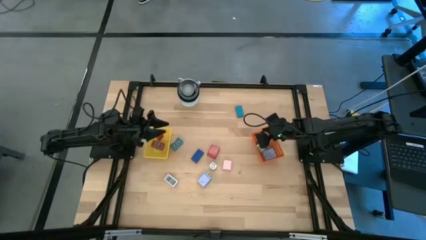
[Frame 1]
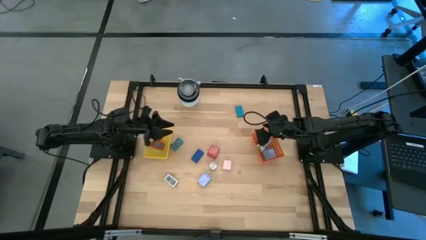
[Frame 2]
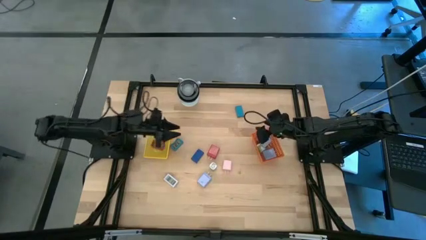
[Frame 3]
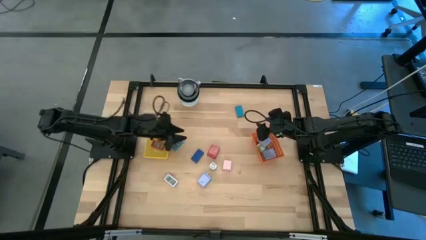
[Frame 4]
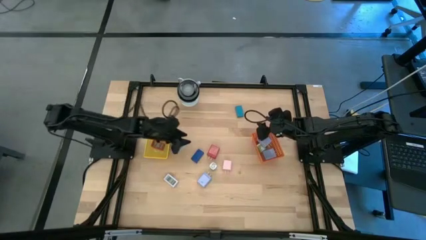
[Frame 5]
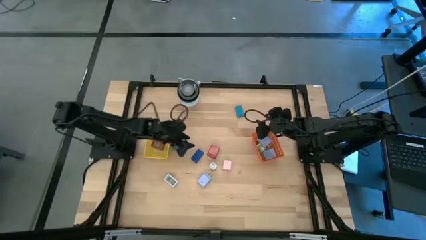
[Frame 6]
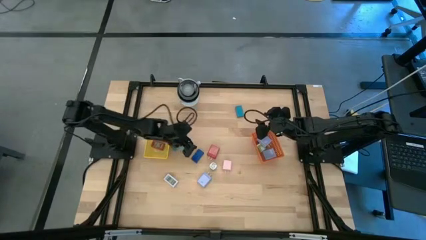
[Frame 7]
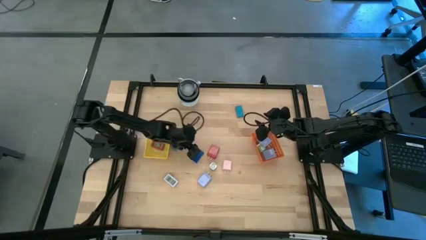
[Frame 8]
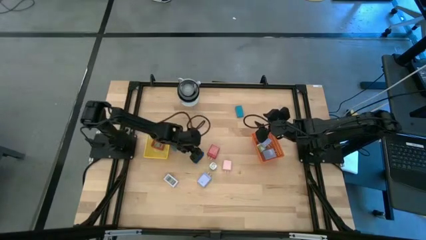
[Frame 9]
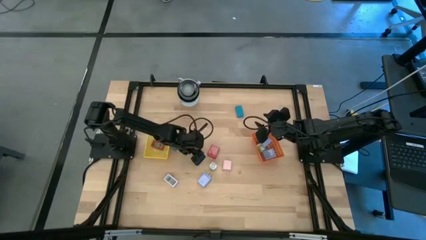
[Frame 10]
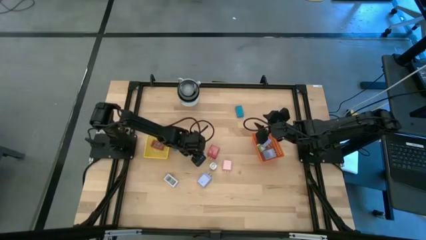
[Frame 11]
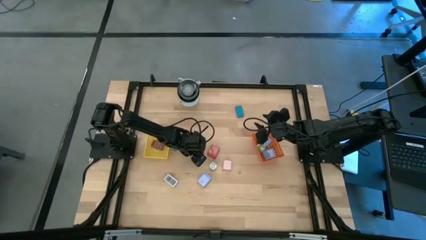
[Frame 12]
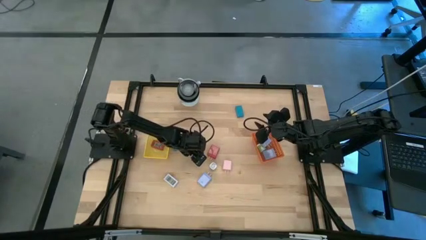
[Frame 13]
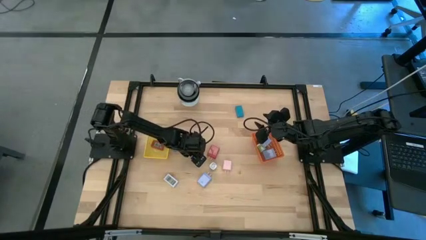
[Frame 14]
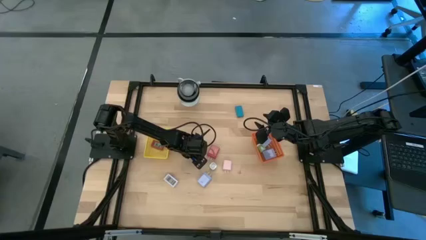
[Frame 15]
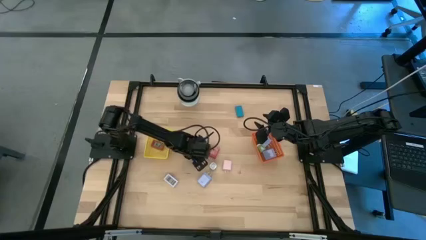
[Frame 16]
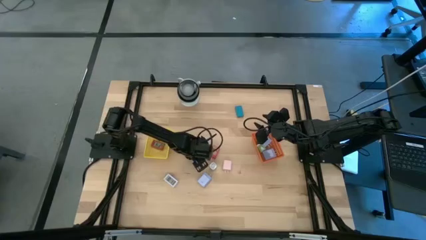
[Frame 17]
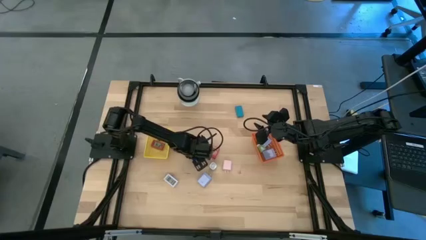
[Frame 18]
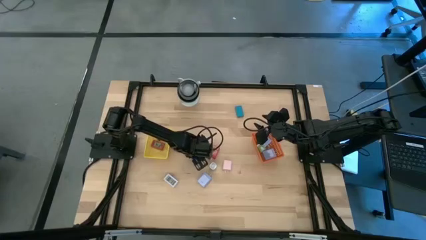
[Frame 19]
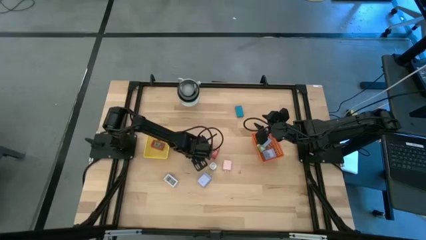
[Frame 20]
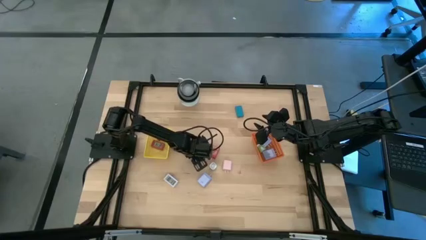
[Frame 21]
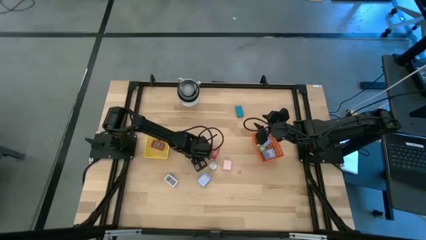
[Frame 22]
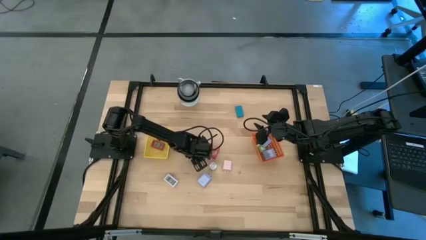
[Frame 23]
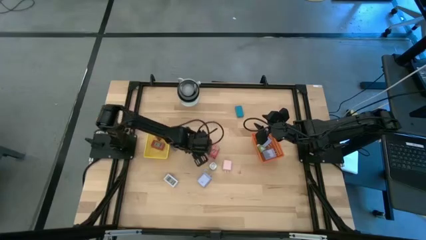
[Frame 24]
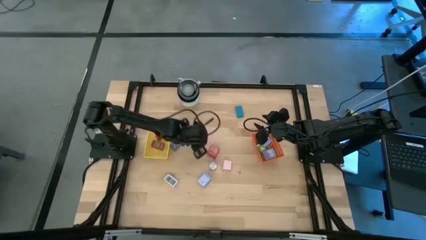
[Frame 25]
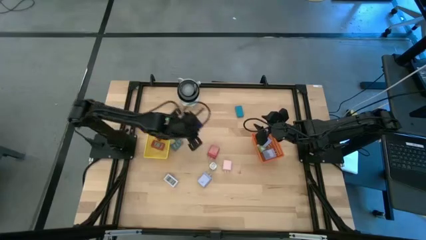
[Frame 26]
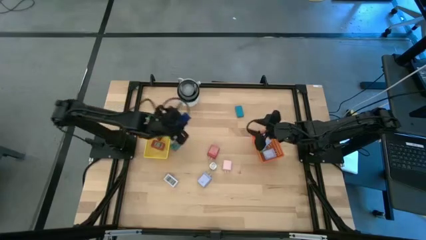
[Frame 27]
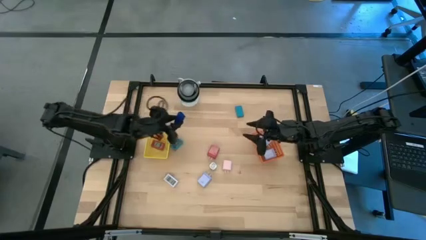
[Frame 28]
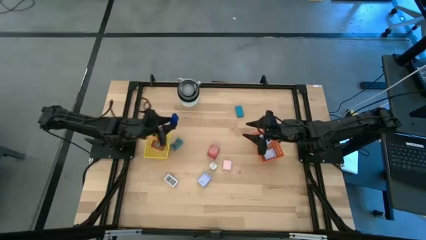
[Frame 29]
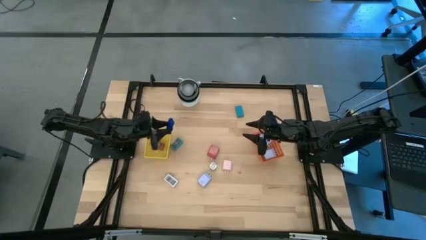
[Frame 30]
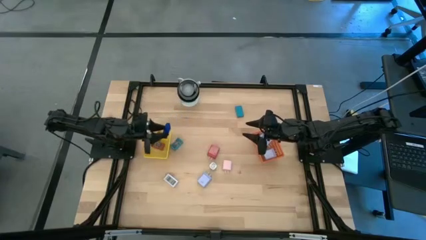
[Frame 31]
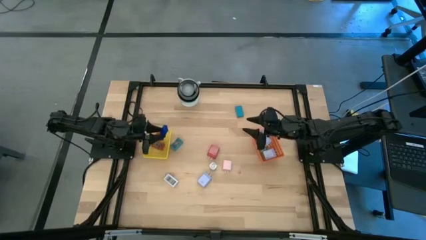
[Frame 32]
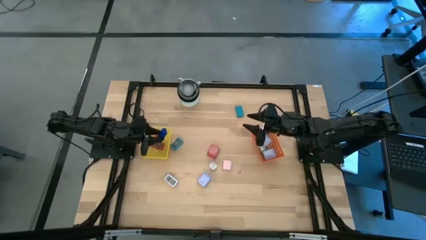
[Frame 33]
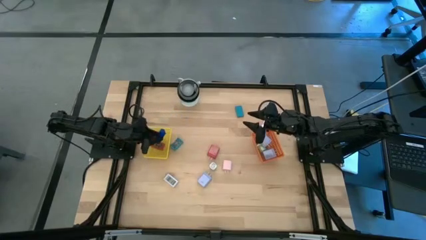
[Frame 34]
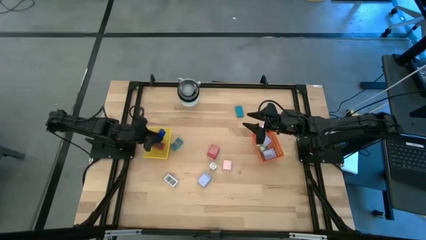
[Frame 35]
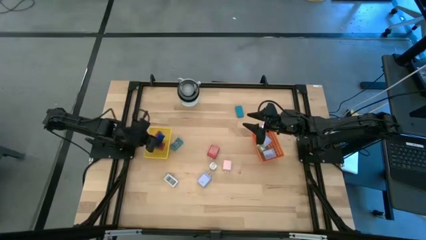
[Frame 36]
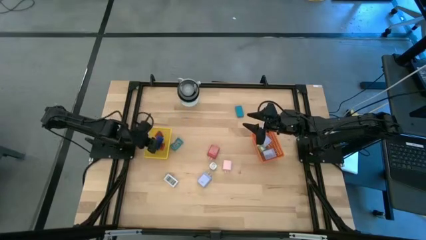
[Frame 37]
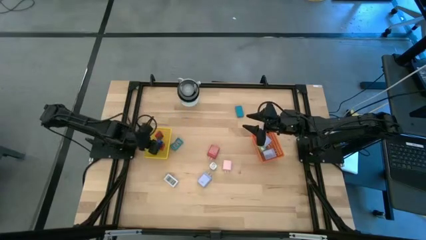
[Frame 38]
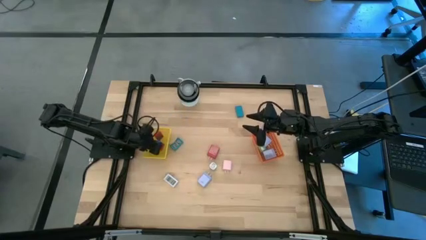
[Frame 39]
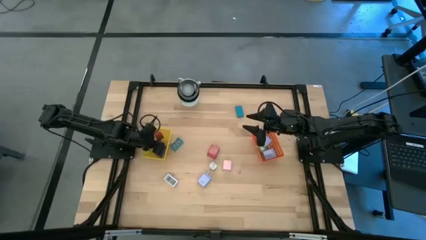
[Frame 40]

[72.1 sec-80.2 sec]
Task: Pick & Place Office items
Put the blue digital clock into the yellow basket

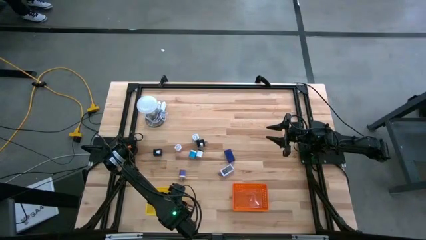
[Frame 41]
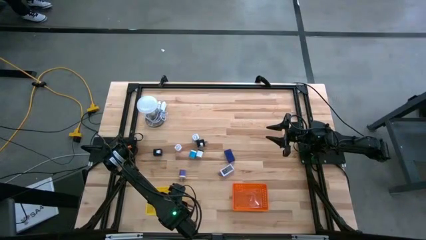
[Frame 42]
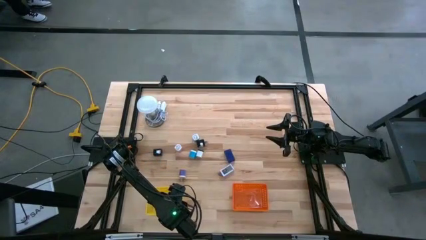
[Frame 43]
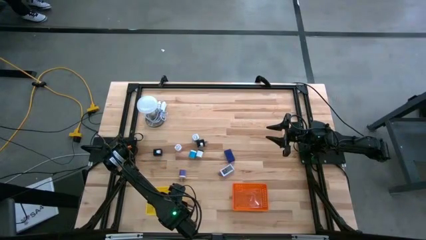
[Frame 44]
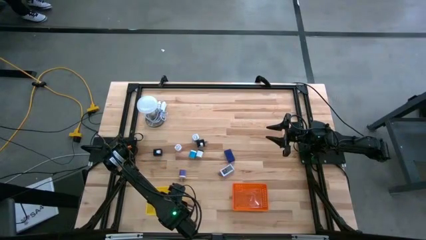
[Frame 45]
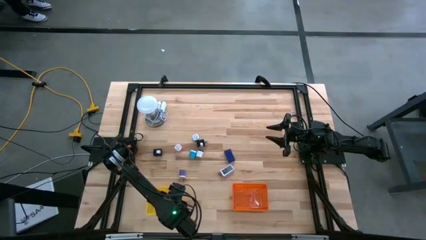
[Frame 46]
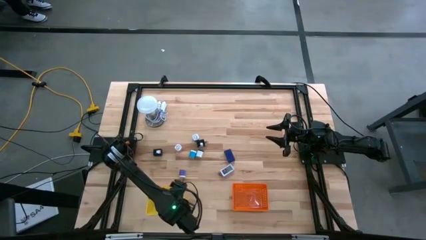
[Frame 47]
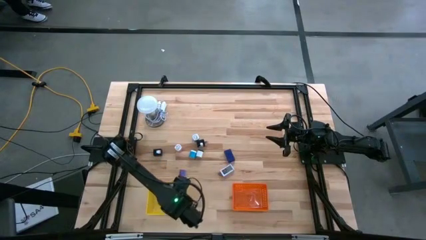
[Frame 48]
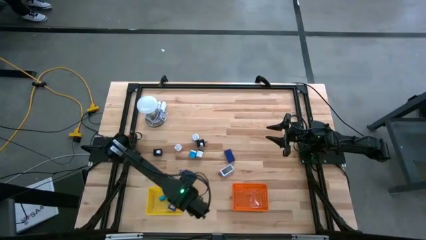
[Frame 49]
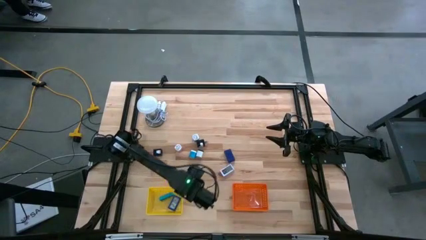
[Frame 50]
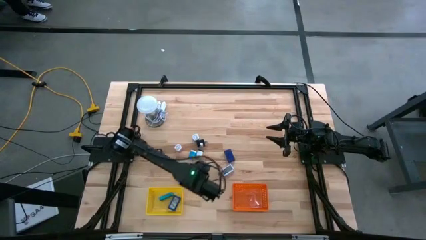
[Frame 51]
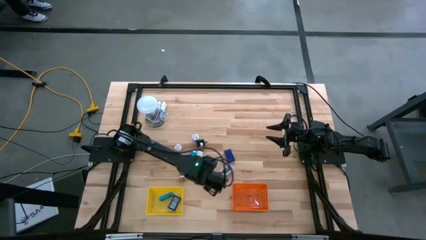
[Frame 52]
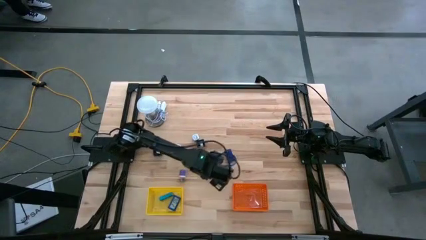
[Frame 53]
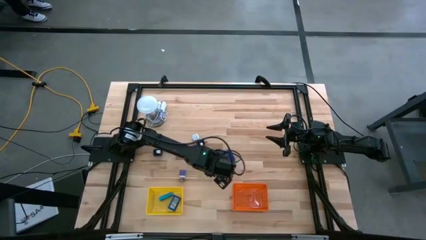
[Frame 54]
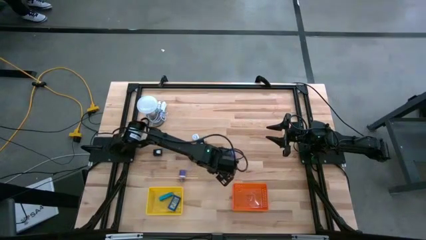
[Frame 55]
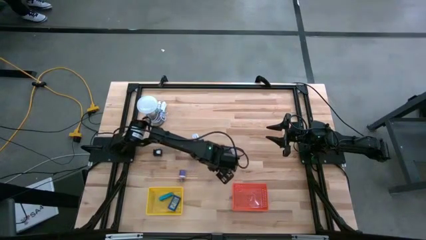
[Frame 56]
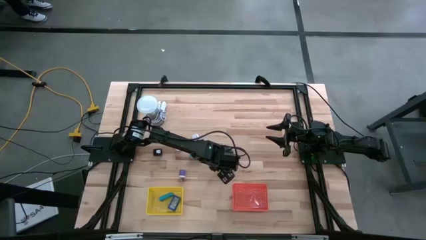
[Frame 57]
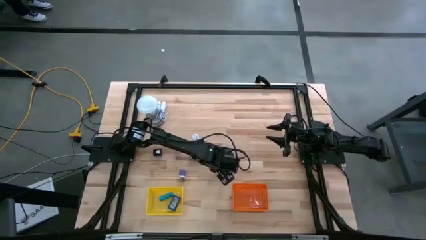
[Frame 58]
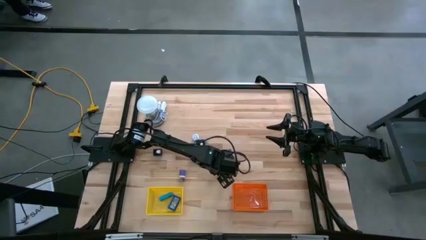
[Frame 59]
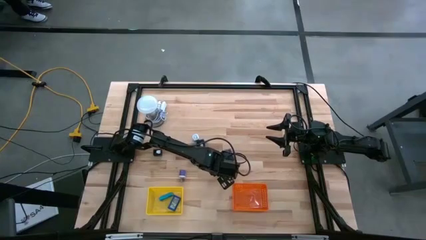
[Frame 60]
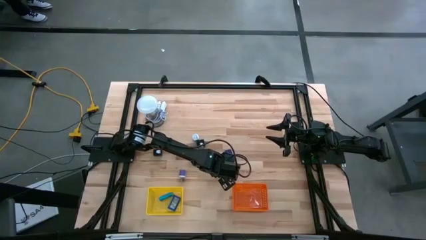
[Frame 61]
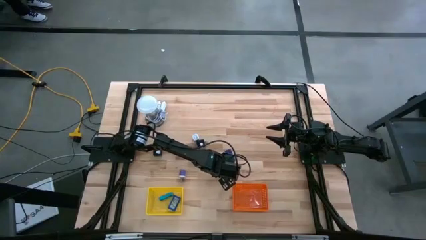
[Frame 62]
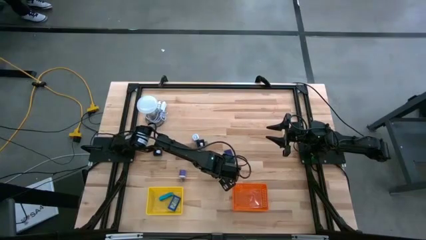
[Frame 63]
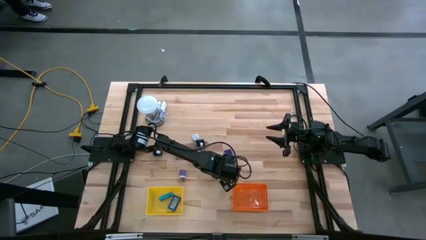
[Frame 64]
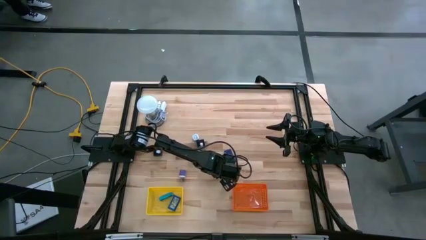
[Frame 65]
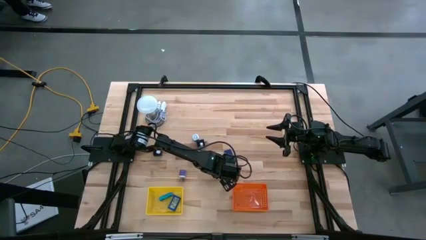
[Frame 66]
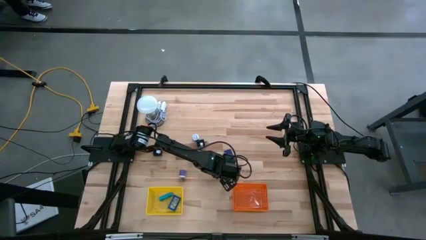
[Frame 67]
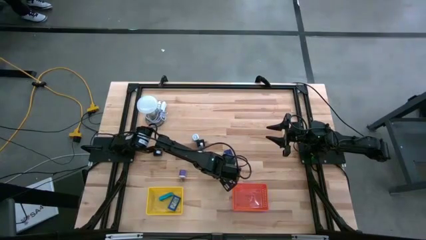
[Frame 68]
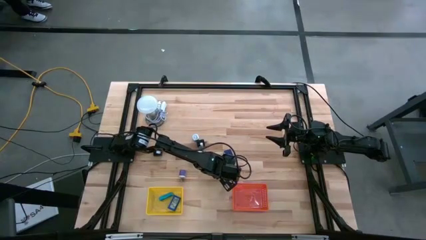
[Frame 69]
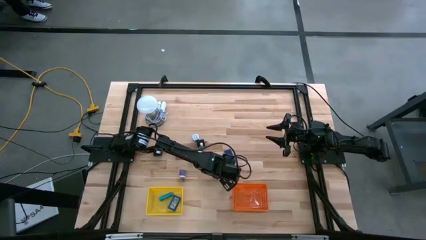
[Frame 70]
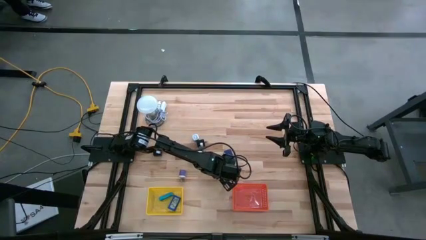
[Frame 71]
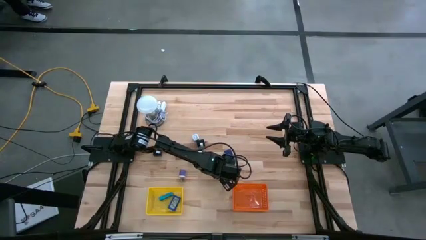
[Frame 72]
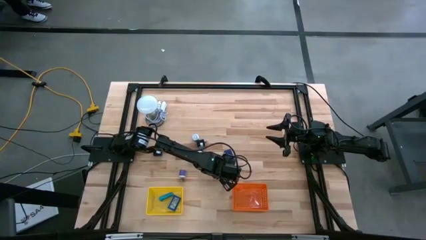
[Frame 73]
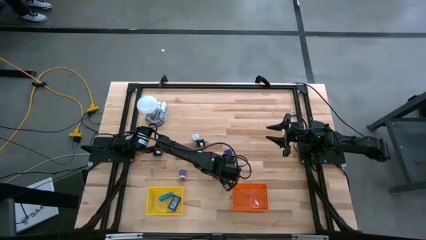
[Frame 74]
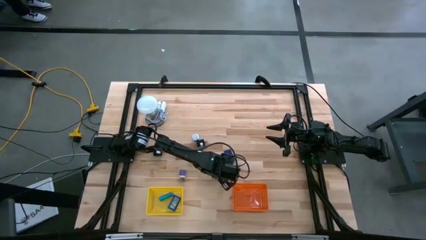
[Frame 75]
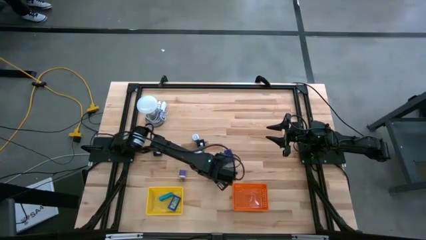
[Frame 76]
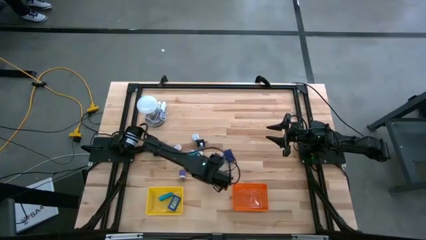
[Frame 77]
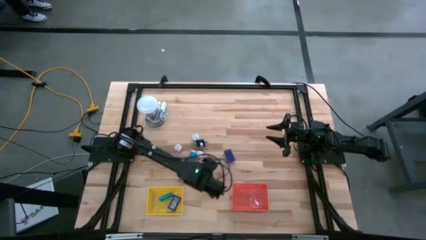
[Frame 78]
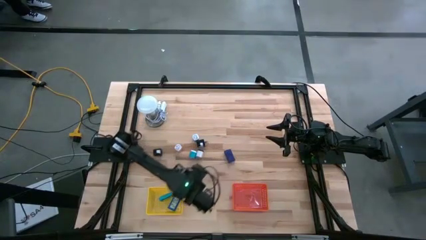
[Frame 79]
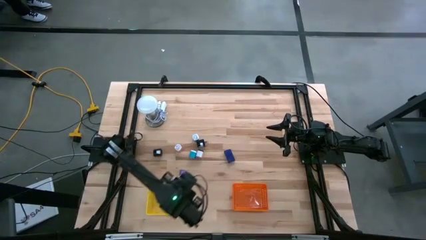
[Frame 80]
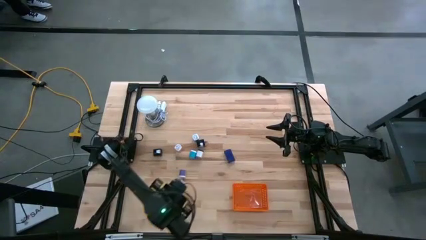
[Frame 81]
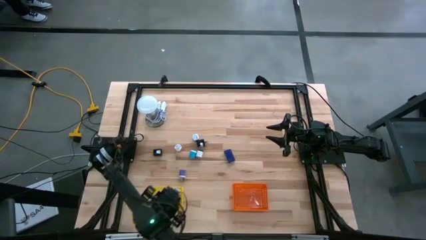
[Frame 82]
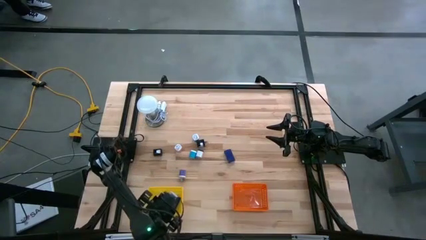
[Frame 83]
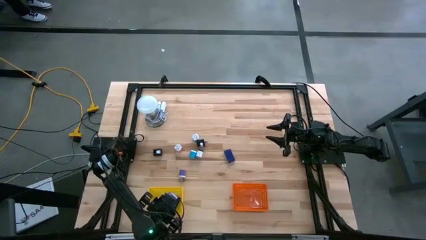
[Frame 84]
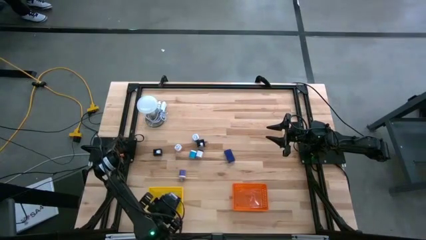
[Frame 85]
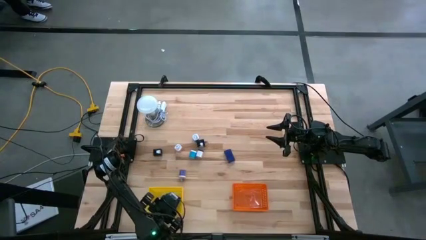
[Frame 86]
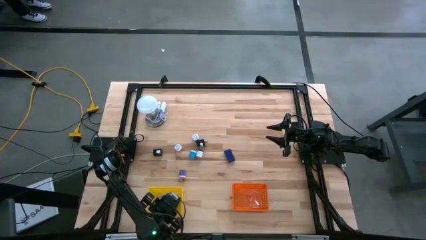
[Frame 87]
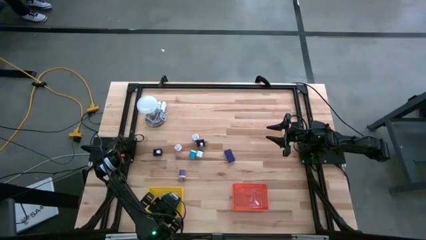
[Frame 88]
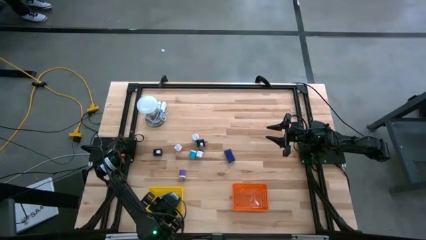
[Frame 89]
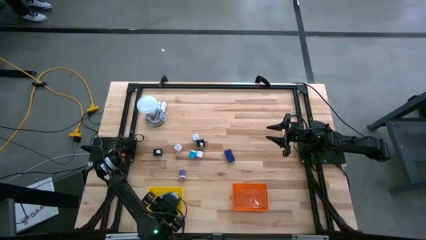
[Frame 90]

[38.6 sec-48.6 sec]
Task: Pick & Place Office items
Put the white digital clock into the yellow bin
